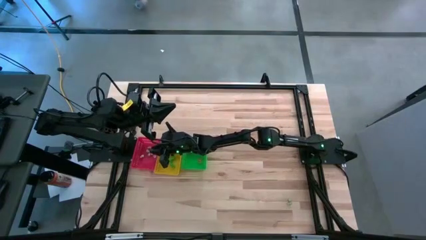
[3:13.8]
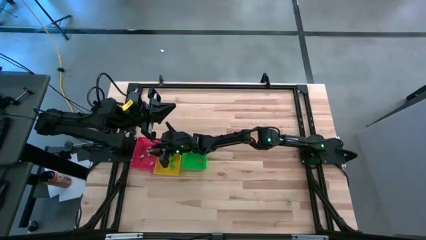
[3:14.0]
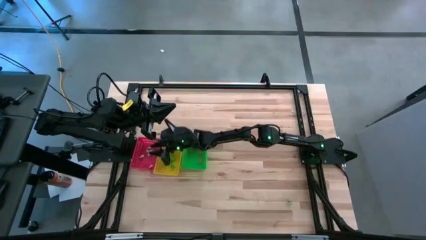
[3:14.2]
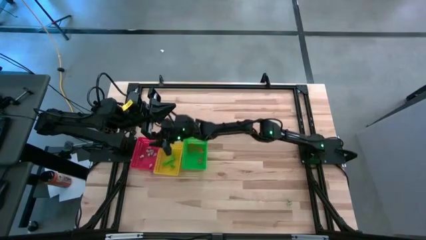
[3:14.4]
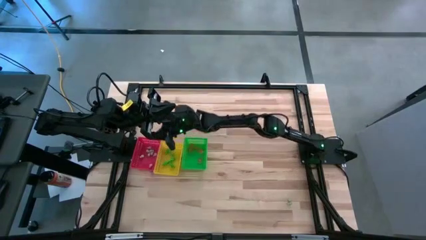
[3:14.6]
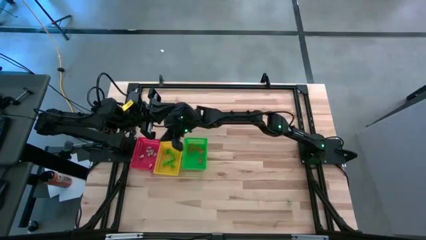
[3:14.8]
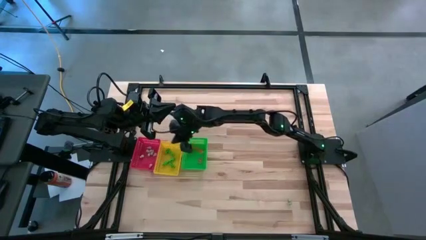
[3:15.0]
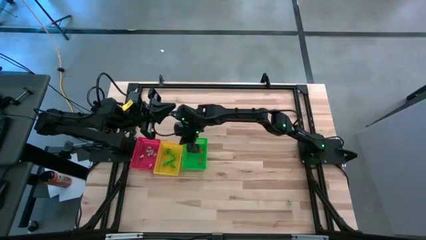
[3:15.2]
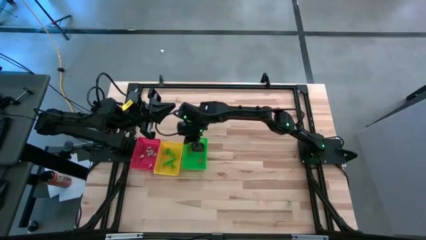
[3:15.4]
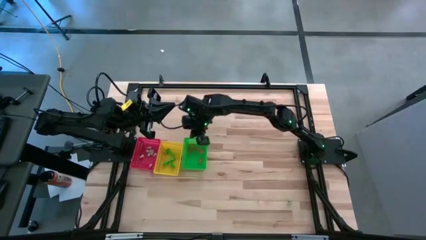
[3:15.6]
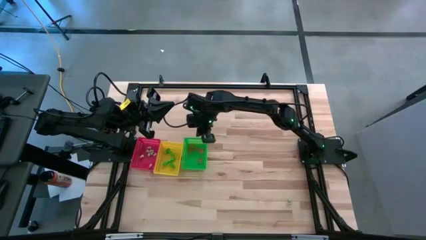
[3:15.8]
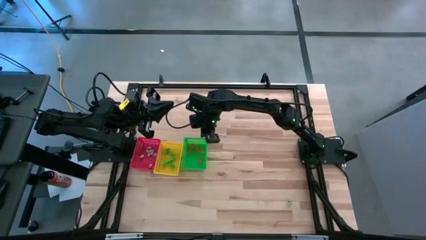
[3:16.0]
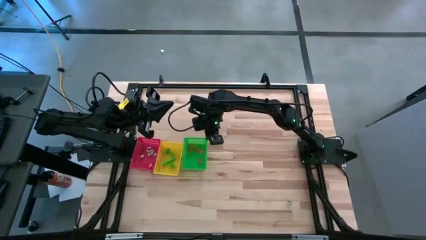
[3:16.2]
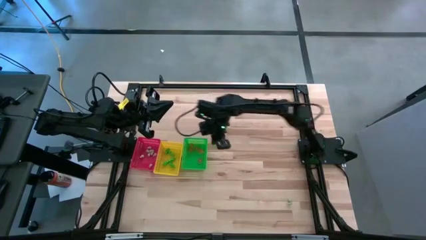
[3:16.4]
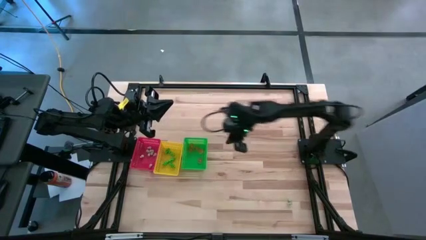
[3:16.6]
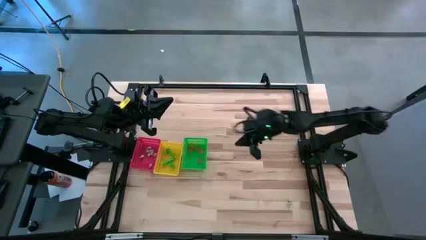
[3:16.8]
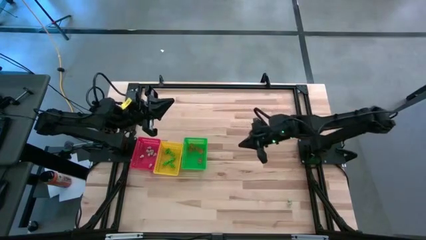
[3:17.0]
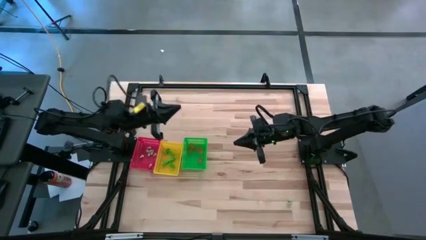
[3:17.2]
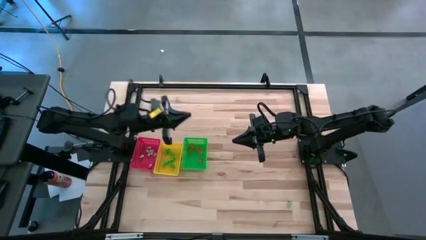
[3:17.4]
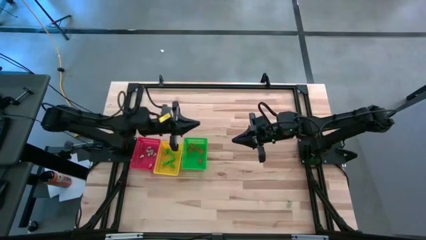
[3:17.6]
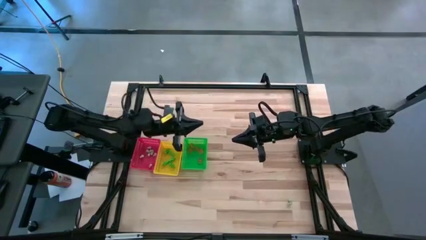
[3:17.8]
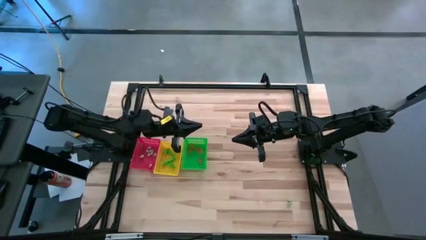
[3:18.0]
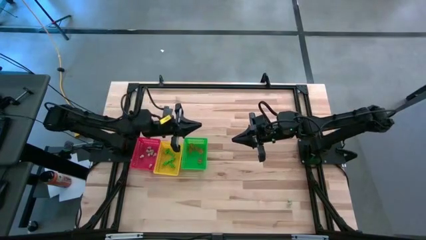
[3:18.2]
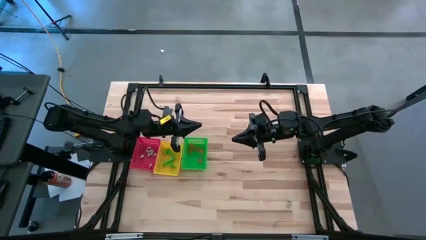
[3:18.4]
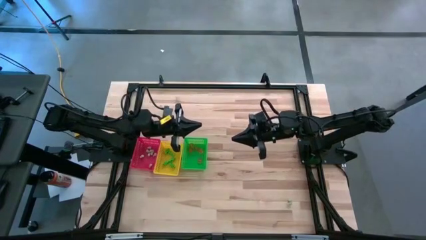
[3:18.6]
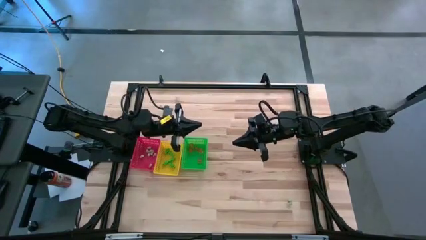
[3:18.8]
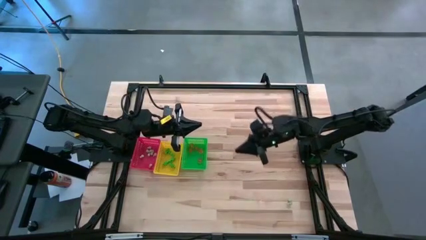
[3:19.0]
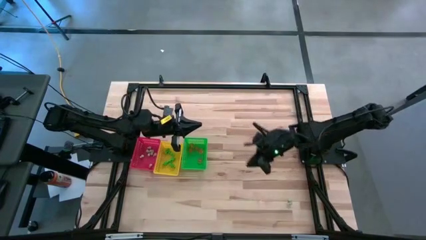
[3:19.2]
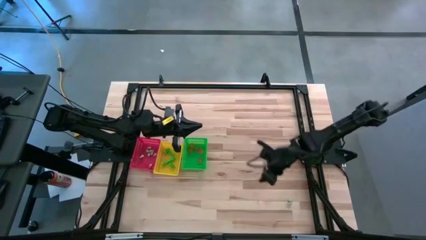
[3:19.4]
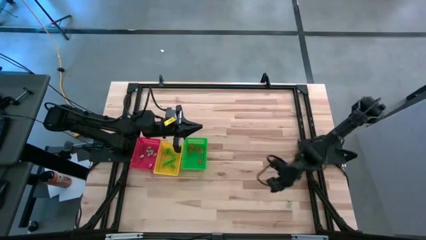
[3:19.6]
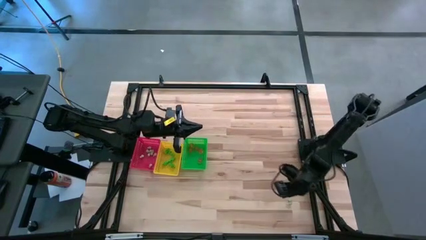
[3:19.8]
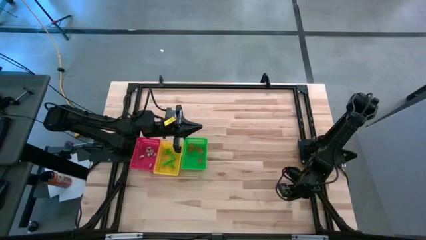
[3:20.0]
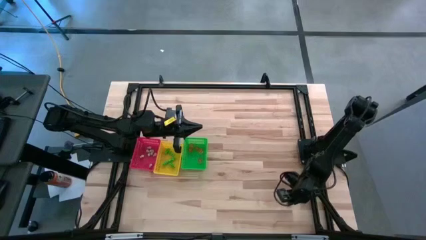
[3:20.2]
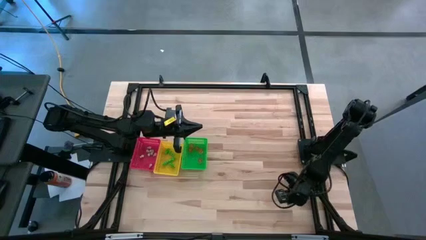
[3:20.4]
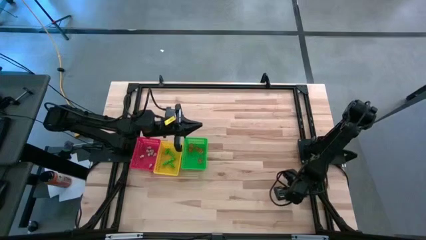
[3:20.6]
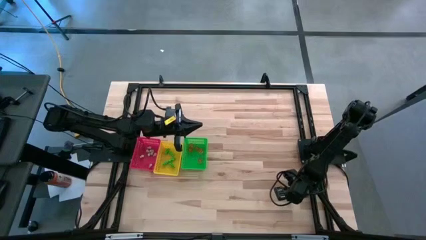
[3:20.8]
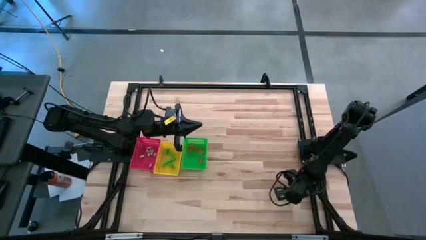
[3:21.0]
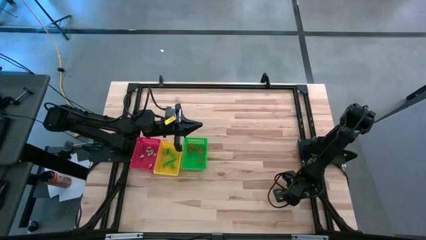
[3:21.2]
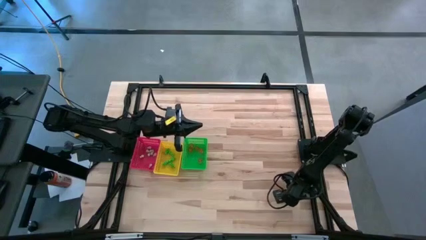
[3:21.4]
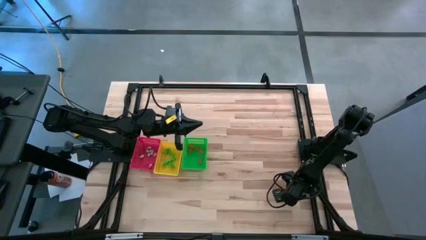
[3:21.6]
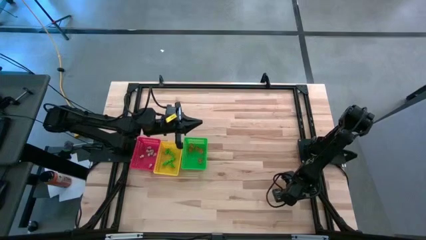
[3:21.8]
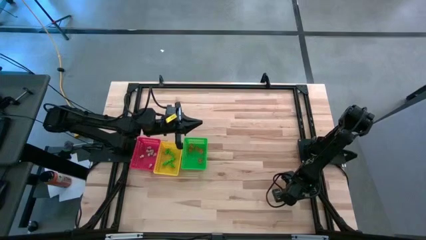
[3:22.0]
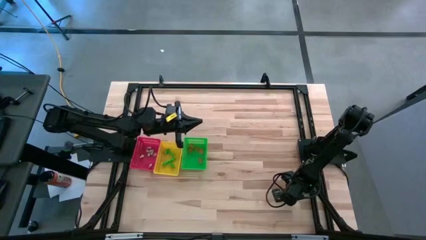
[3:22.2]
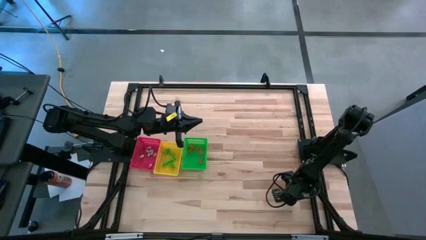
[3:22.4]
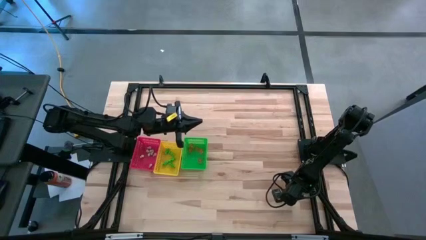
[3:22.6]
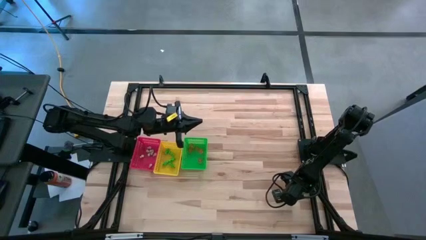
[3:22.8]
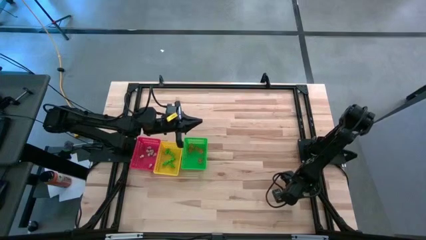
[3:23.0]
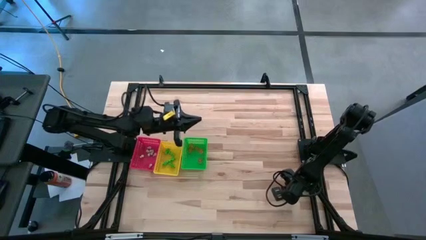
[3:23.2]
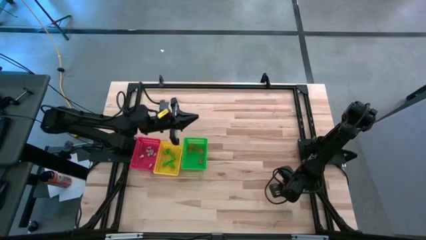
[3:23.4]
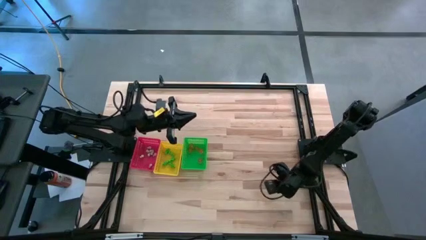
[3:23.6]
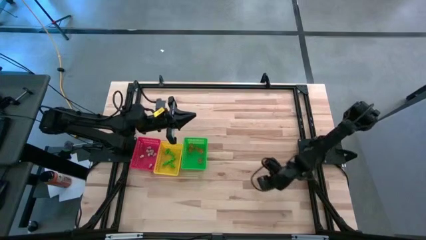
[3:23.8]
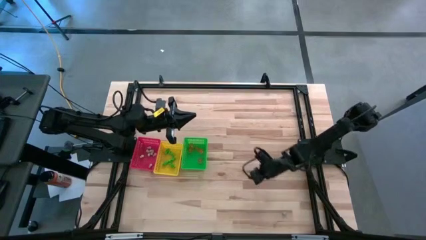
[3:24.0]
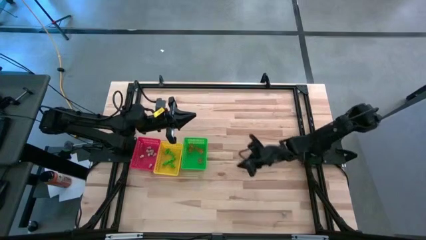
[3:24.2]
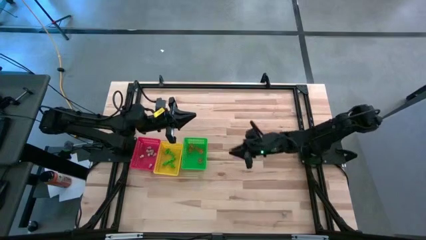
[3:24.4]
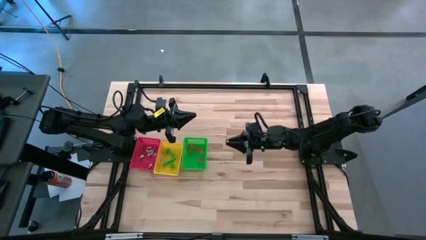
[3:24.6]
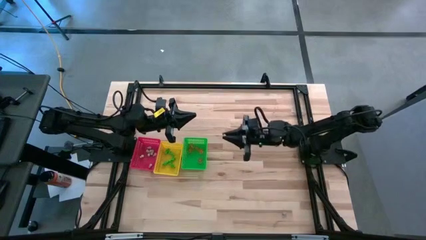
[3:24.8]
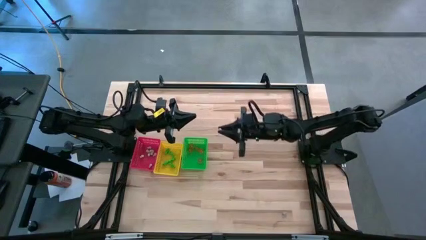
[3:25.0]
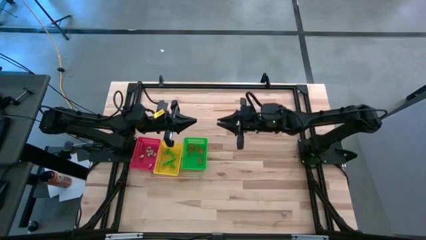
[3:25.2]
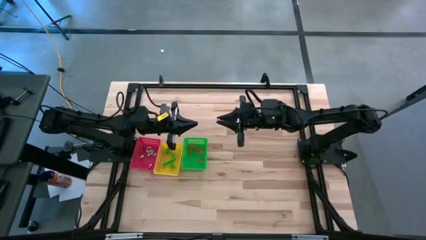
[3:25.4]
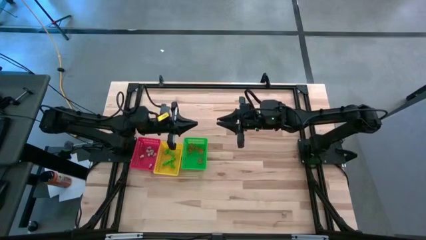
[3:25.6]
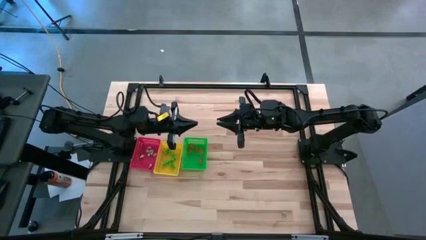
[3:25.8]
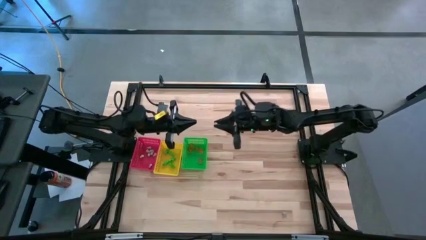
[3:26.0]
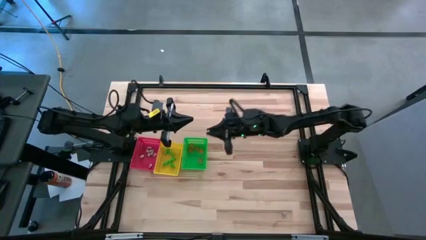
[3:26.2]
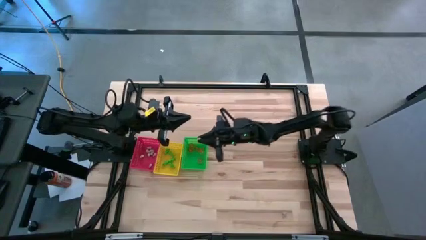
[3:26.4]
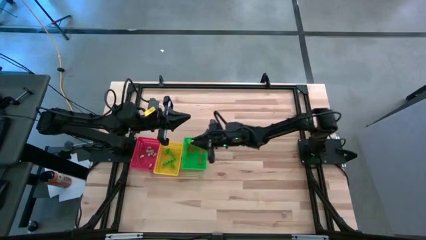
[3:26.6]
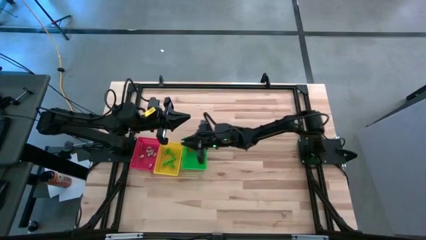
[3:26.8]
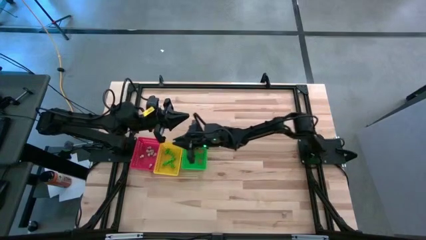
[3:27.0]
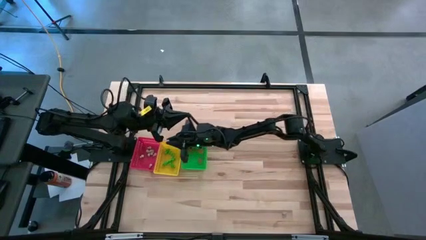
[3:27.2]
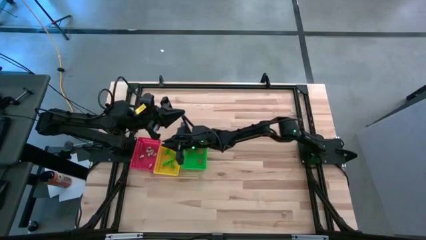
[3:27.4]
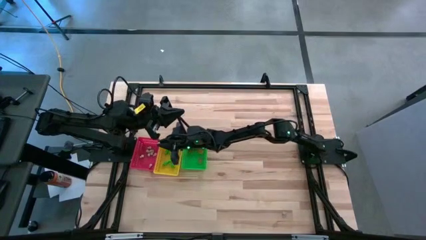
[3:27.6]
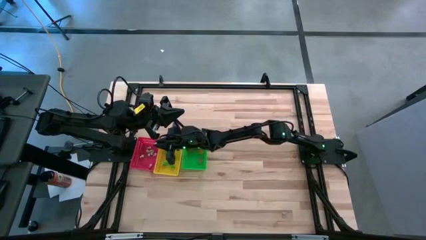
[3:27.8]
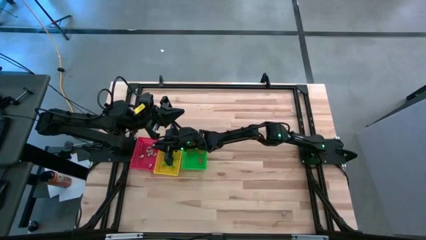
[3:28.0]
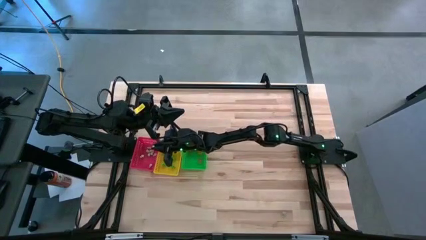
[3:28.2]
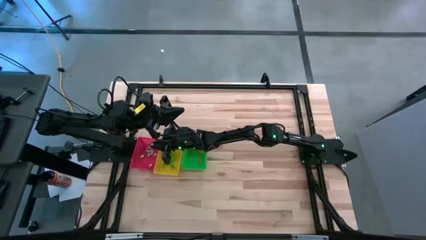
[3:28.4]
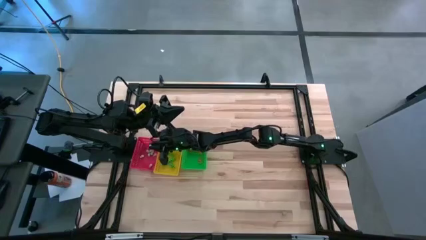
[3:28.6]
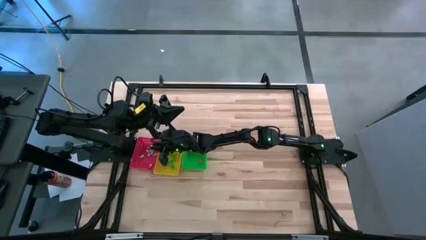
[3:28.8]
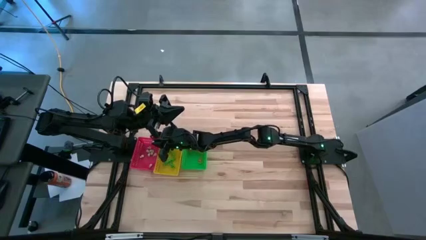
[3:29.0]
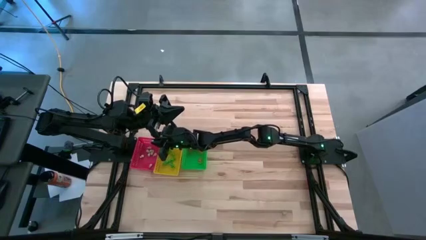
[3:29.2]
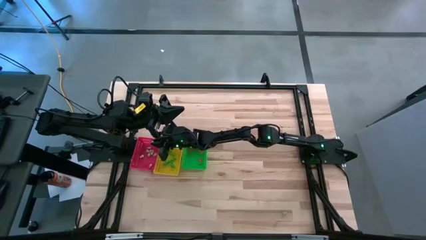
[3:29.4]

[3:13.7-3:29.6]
Task: Sort Halloween decoration
Put the white skull toy into the red bin

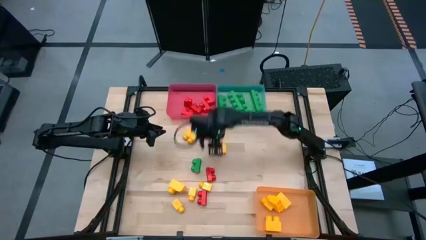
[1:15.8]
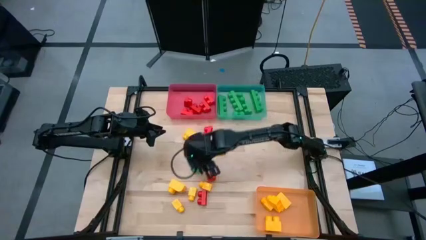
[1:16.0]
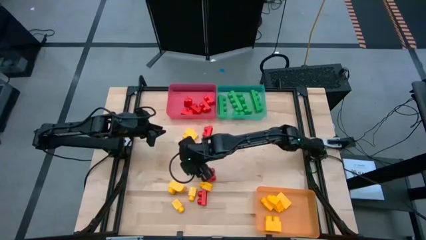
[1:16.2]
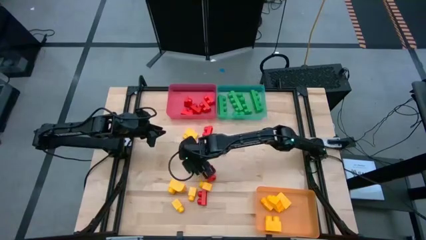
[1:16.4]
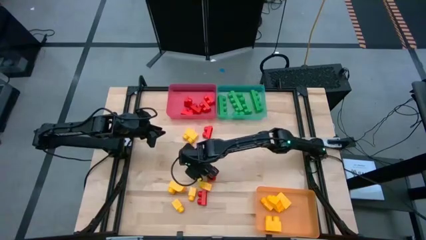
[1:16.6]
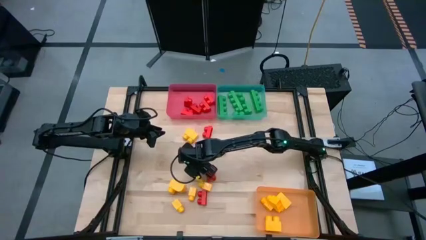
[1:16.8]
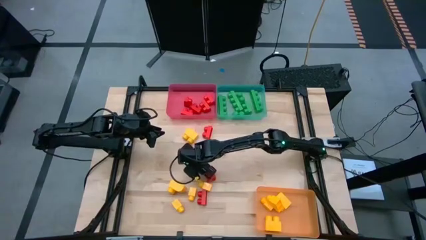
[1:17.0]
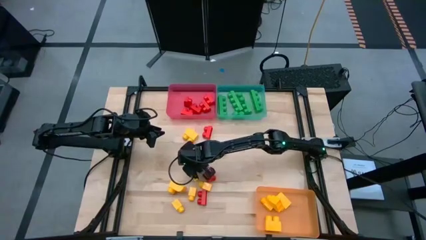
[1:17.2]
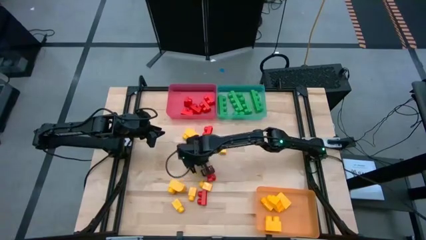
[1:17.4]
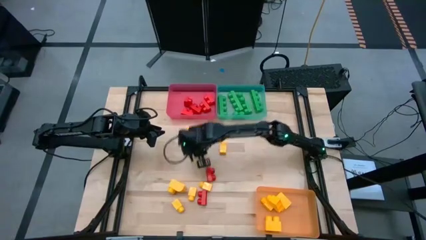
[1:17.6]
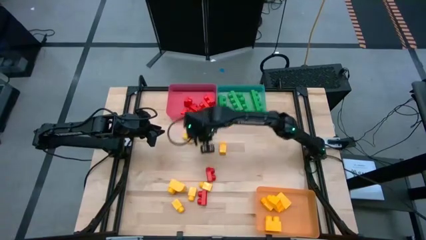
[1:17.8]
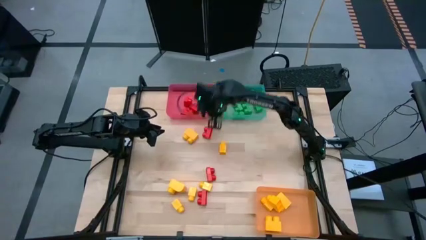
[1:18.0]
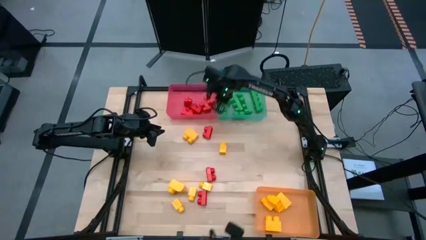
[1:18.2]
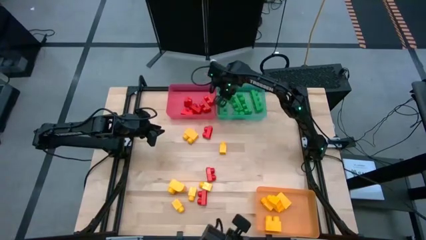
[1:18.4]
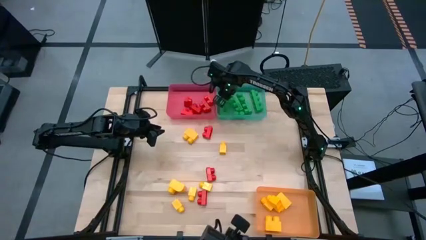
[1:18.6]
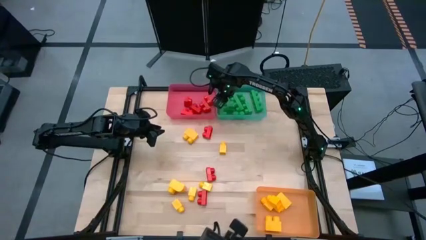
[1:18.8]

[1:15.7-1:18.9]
Task: Sort blocks
Put the green game piece into the green bin
